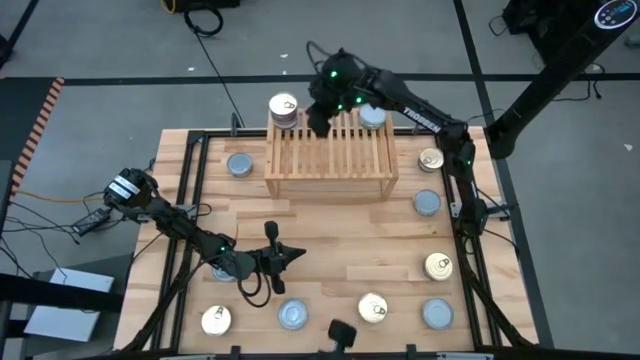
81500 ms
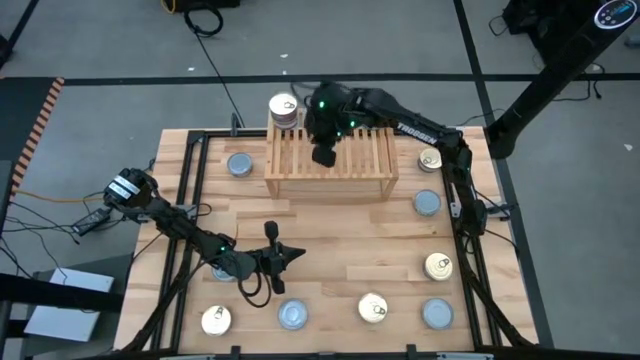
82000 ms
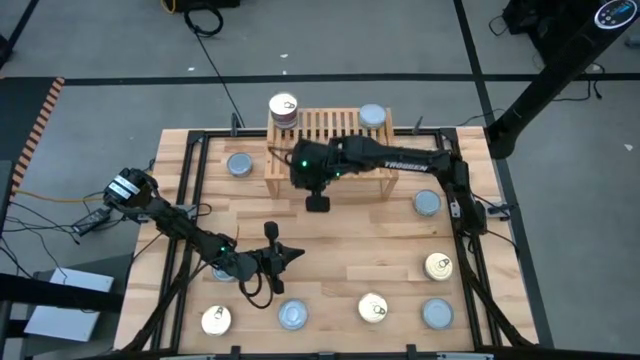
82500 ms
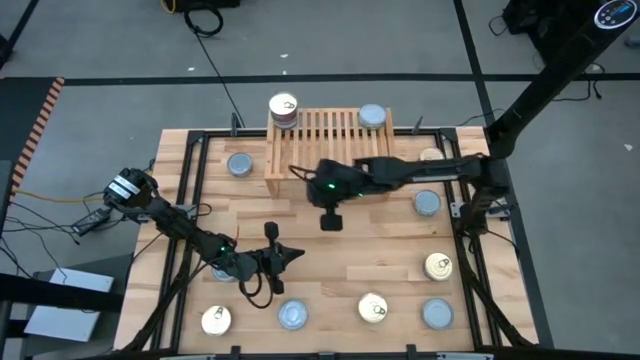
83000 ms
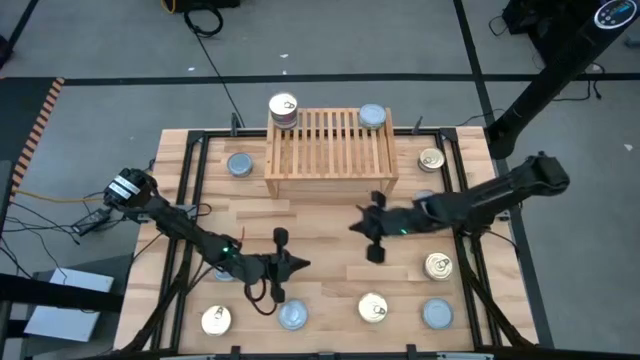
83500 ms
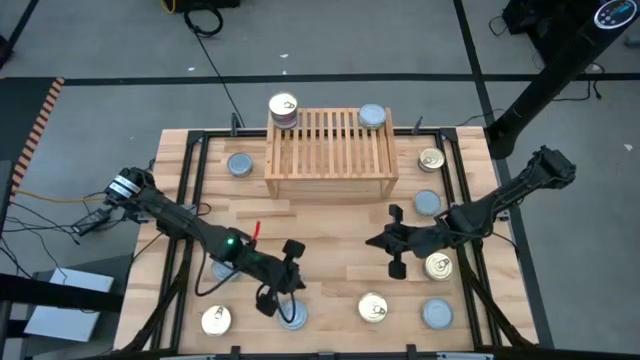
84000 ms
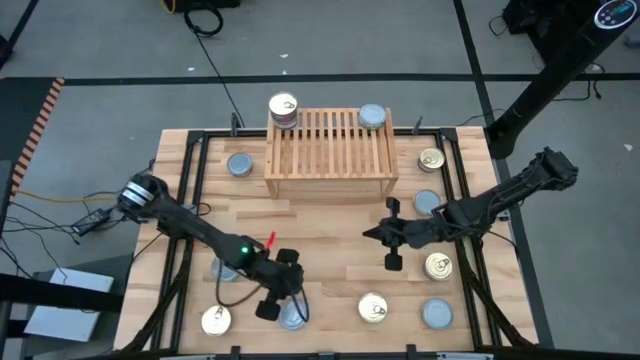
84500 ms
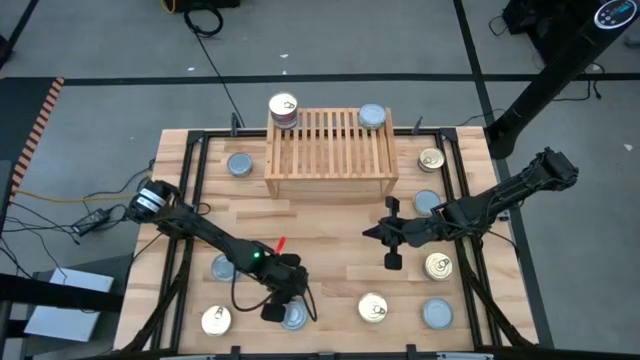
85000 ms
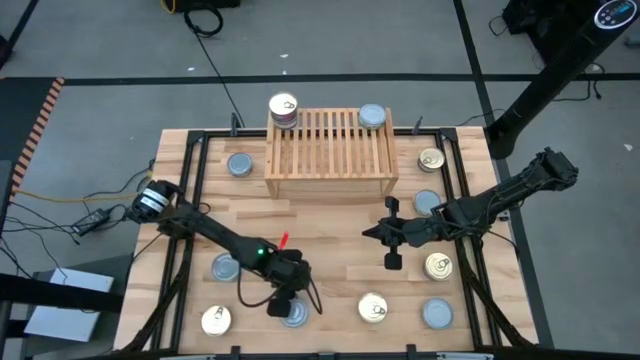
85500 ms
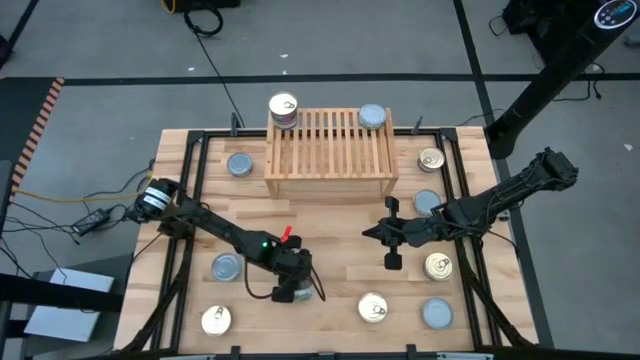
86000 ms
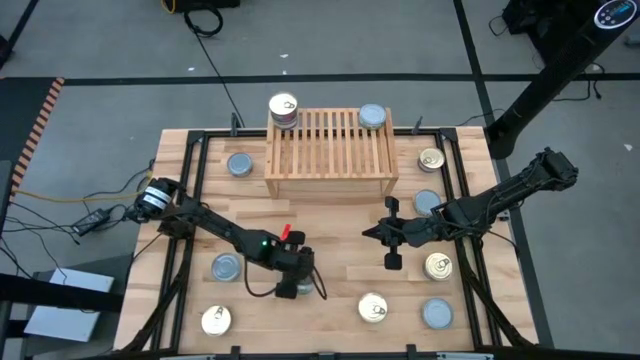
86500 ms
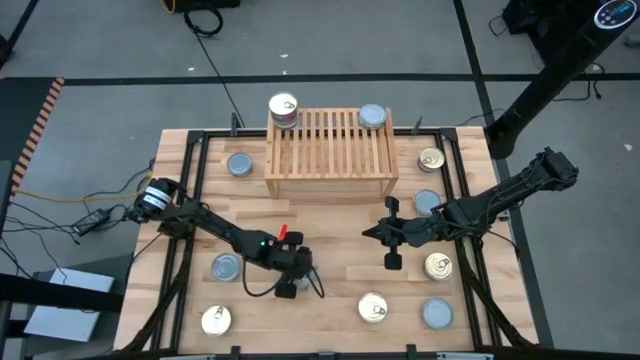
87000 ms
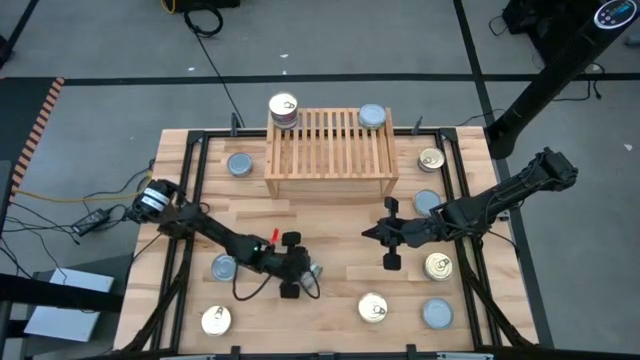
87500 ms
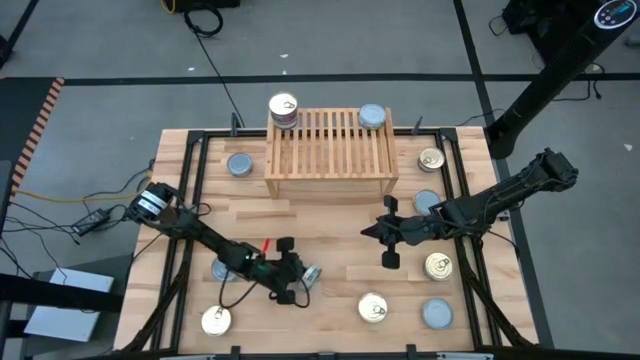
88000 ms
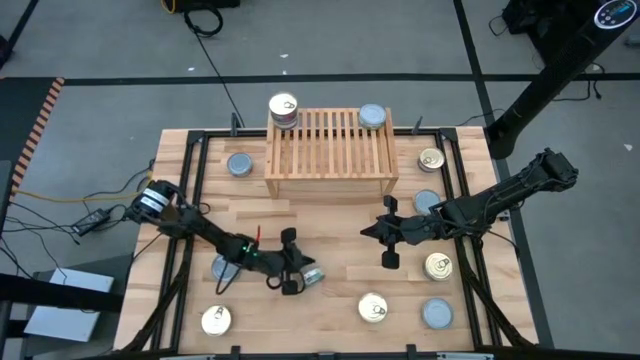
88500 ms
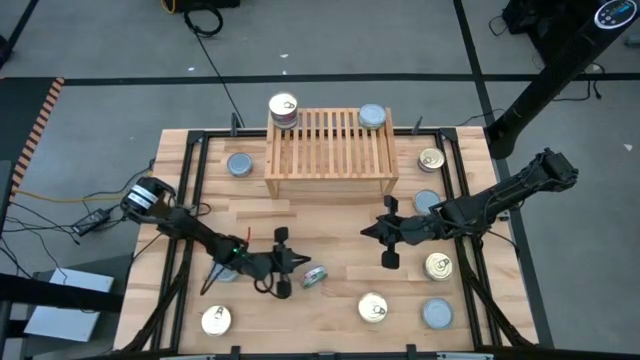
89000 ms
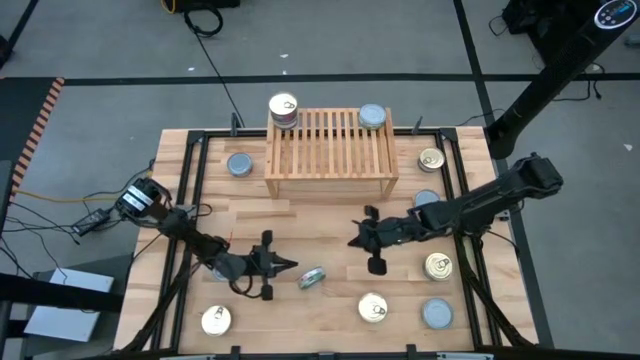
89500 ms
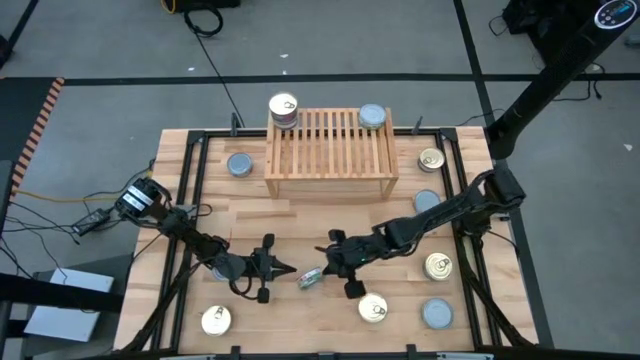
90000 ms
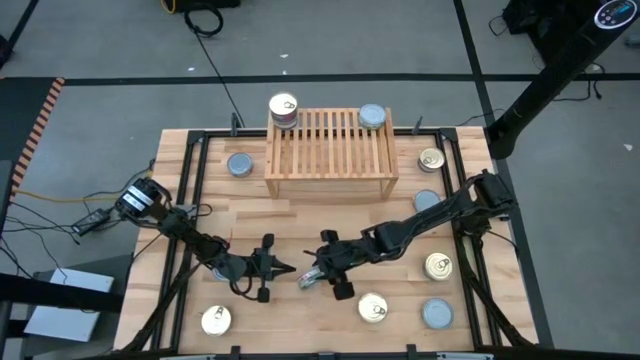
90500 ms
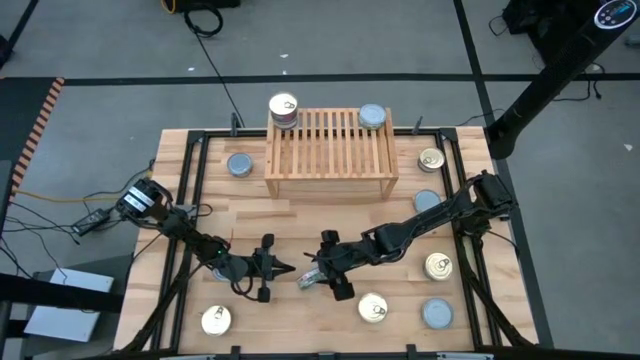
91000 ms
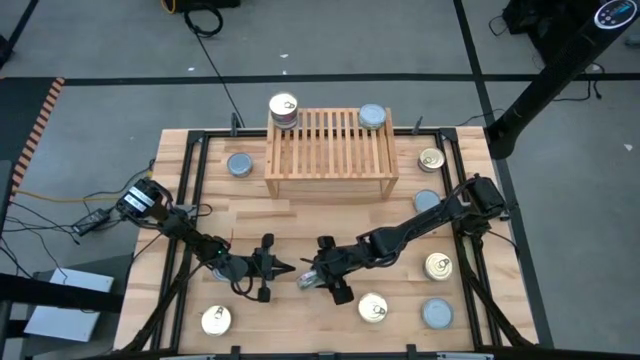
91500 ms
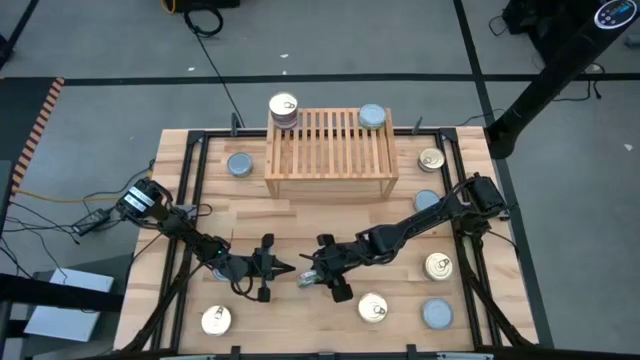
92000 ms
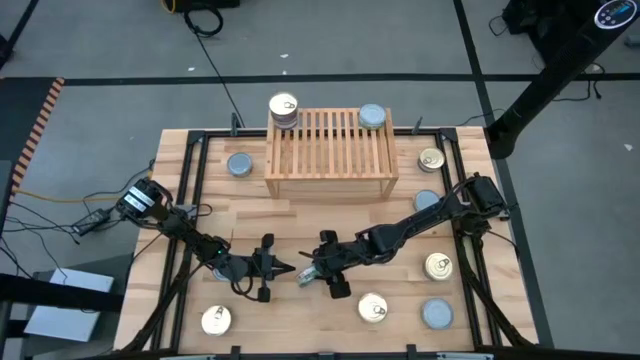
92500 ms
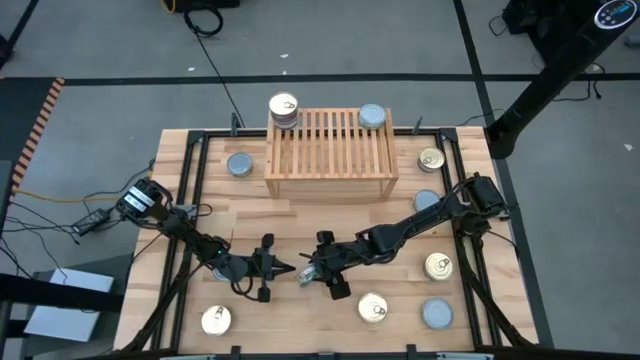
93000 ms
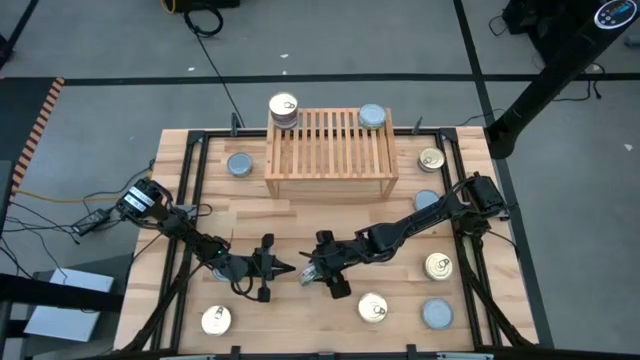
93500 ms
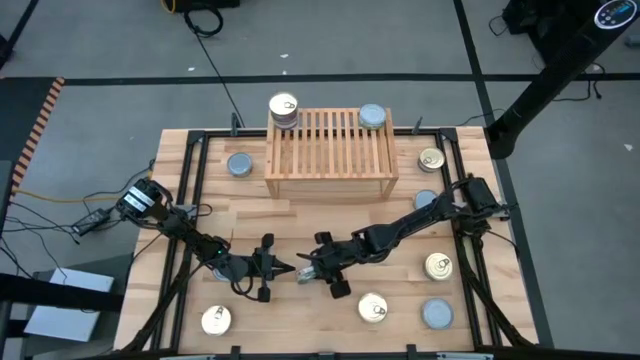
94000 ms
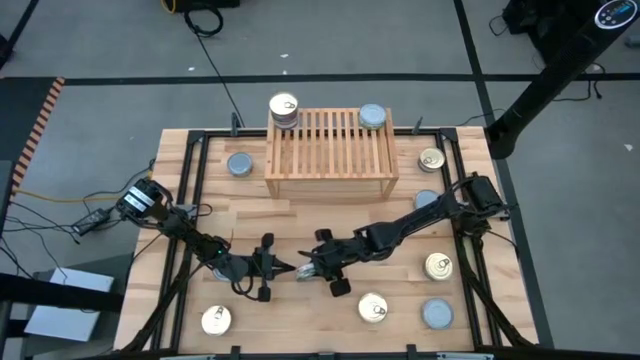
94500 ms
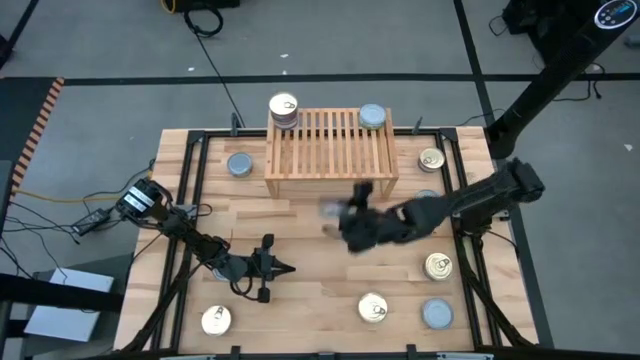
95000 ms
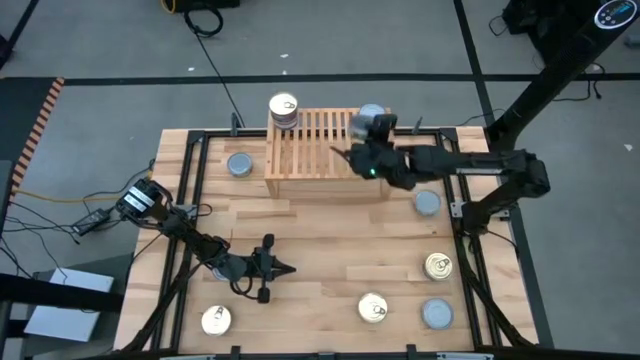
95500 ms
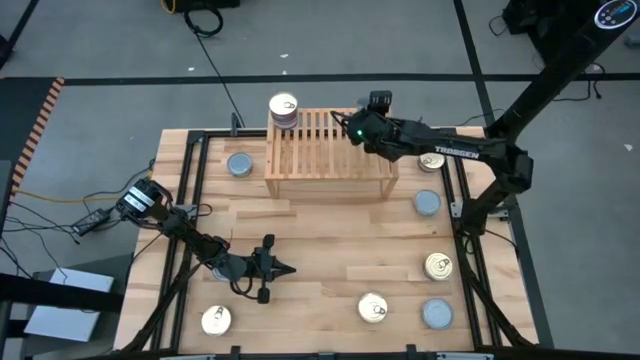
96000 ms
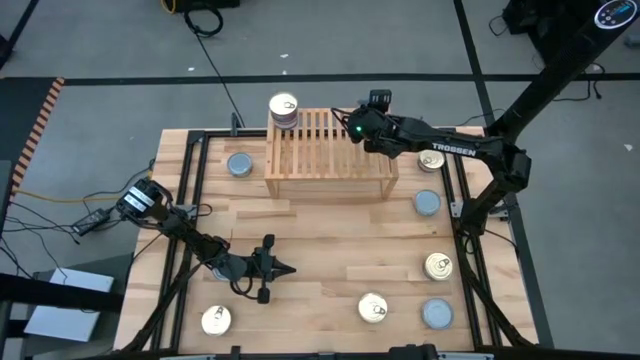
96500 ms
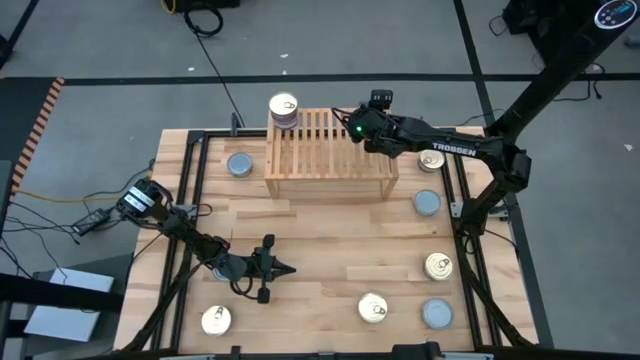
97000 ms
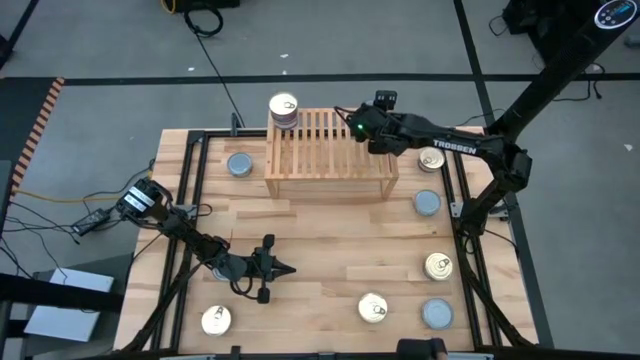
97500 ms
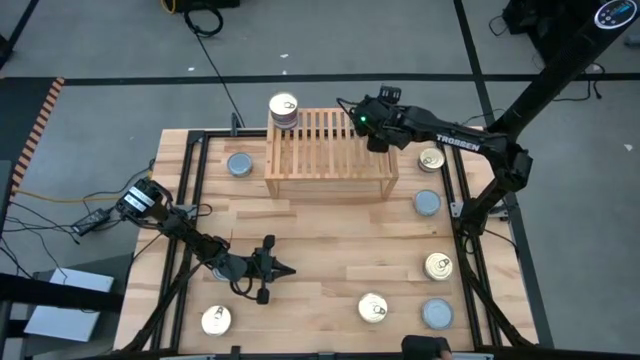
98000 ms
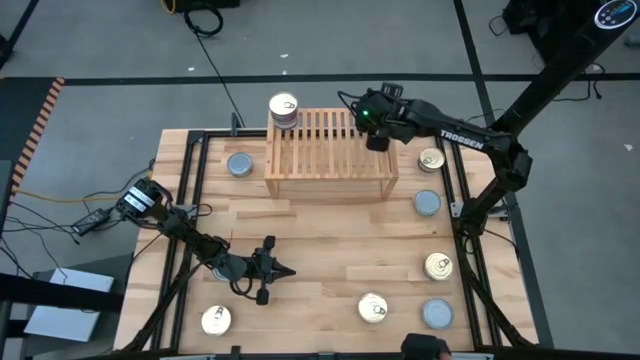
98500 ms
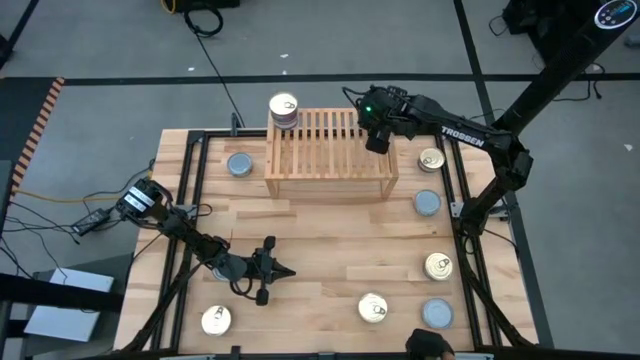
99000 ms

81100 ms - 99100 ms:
Task: Stack canned seafood by type on shelf
Stack the green tuna can on top of the green tuna can on the shelf
